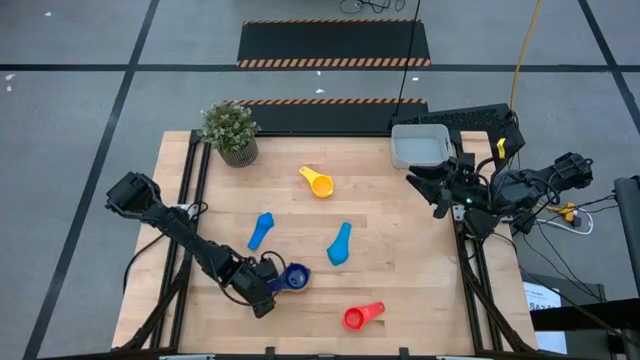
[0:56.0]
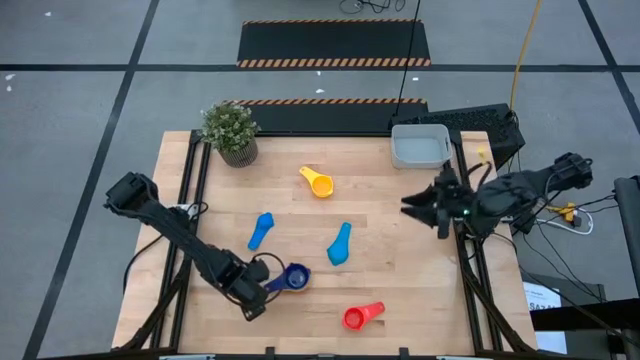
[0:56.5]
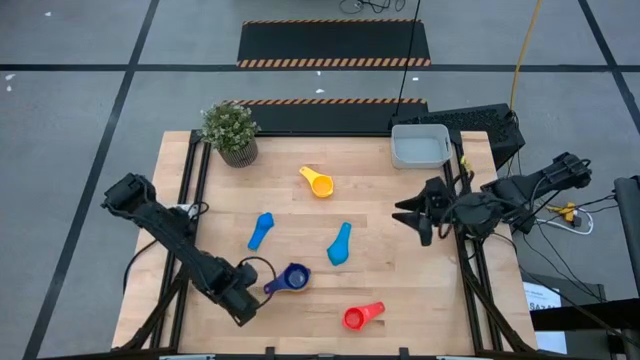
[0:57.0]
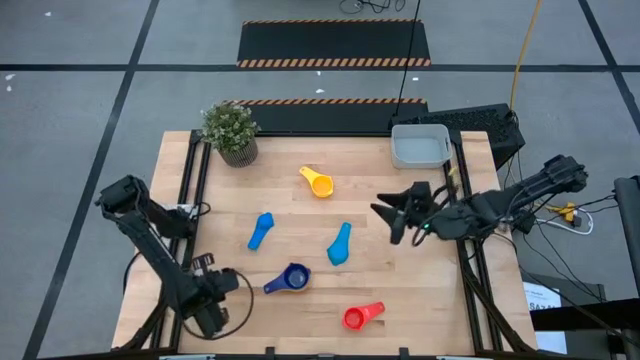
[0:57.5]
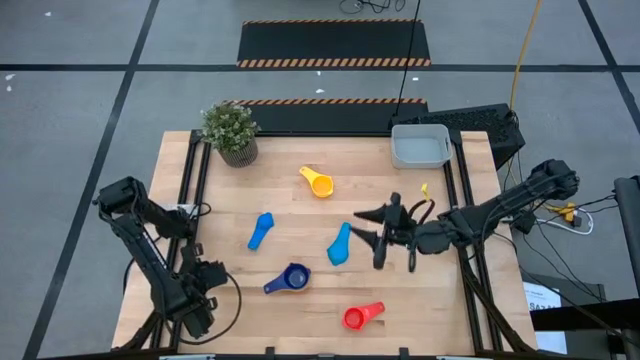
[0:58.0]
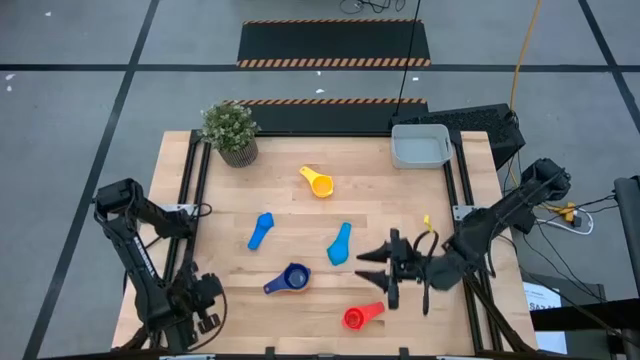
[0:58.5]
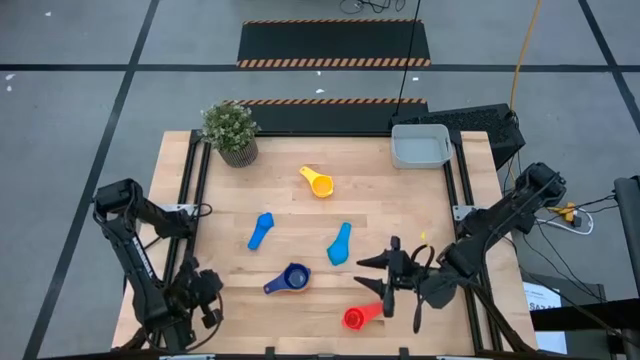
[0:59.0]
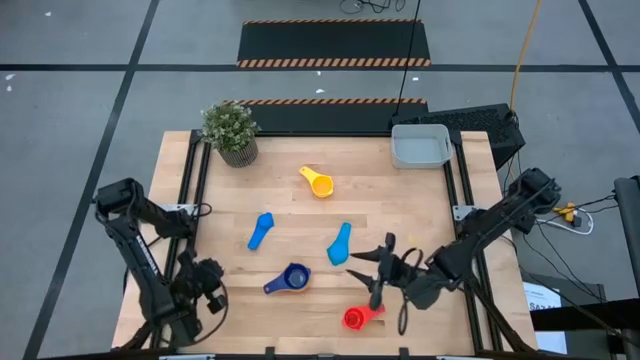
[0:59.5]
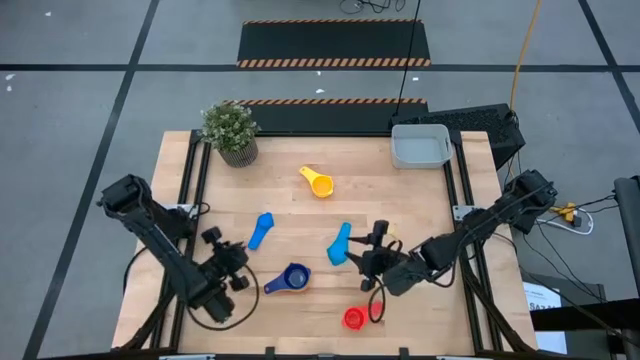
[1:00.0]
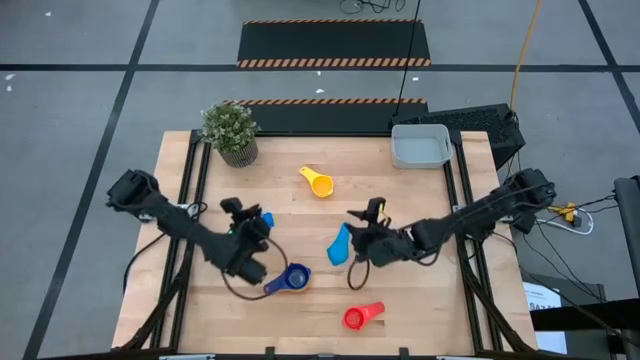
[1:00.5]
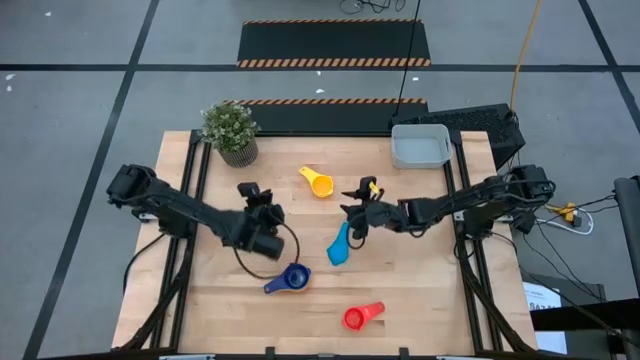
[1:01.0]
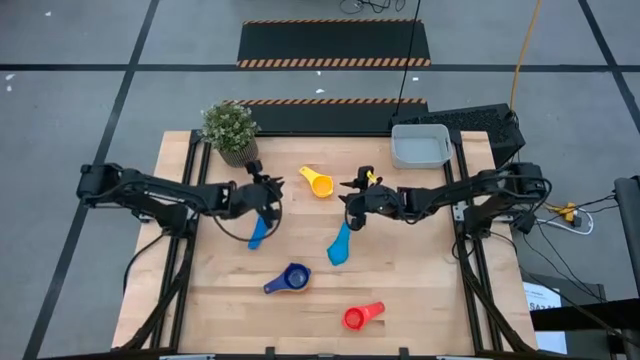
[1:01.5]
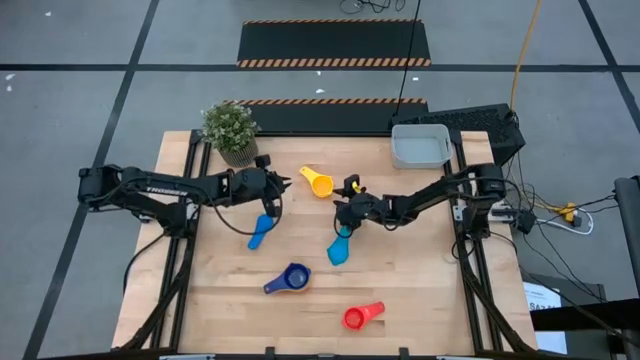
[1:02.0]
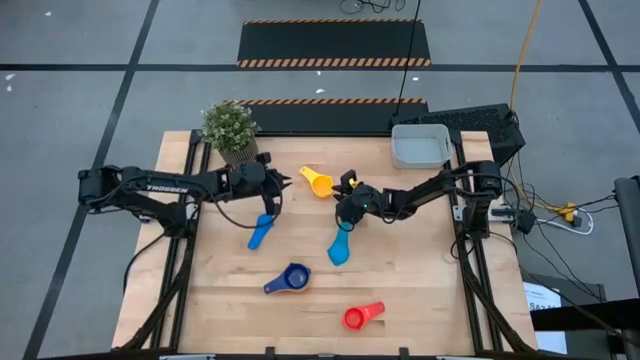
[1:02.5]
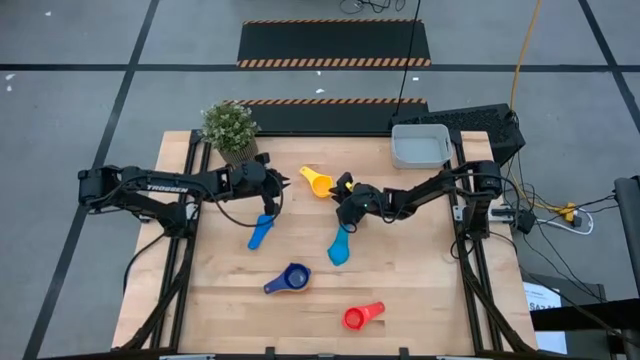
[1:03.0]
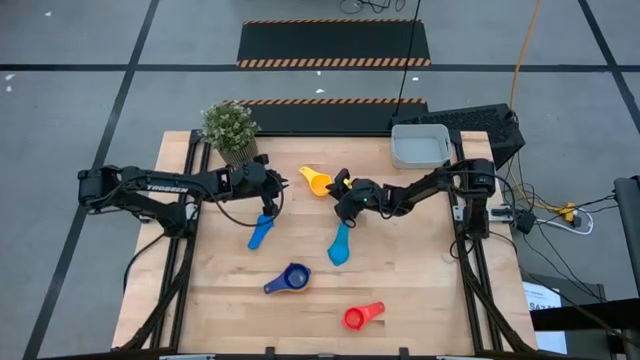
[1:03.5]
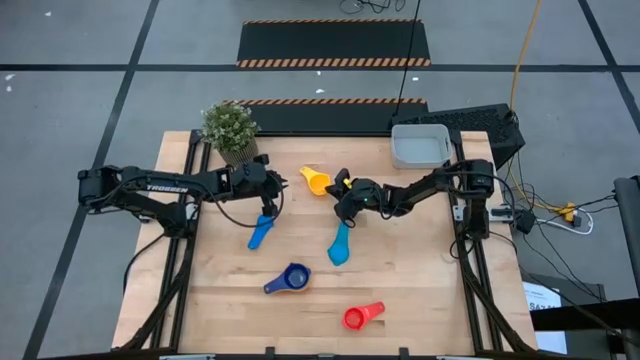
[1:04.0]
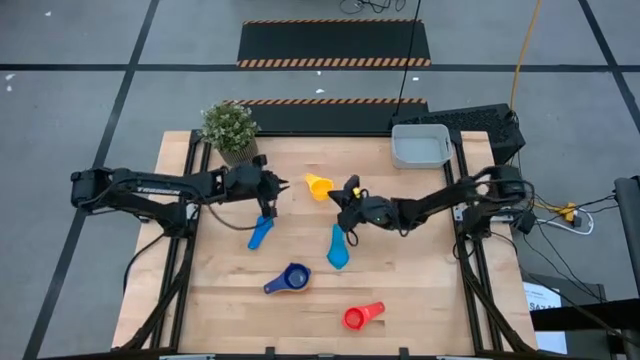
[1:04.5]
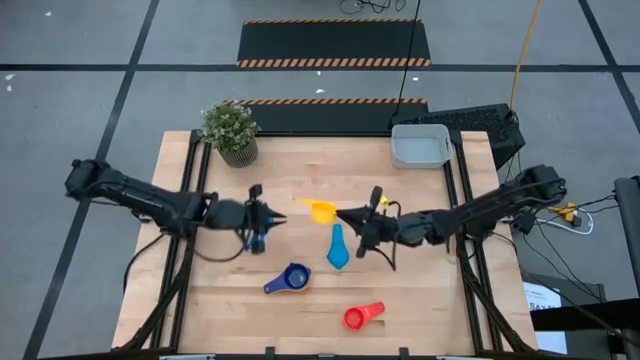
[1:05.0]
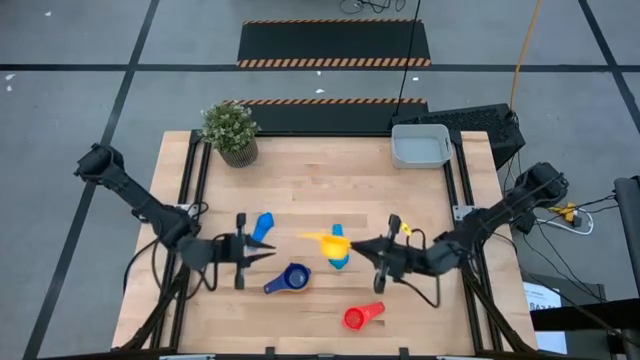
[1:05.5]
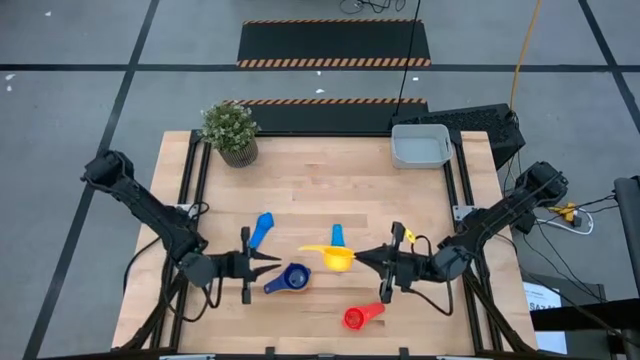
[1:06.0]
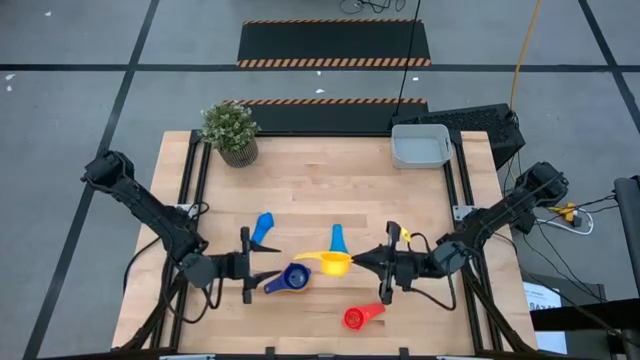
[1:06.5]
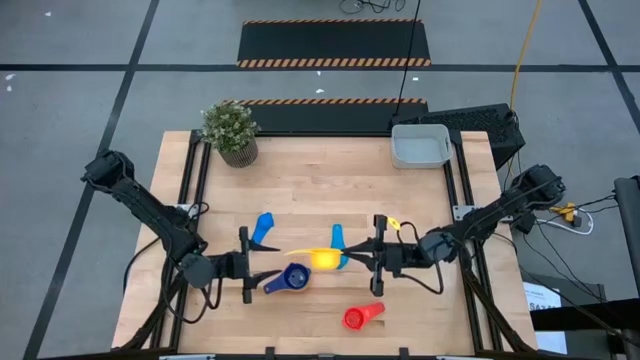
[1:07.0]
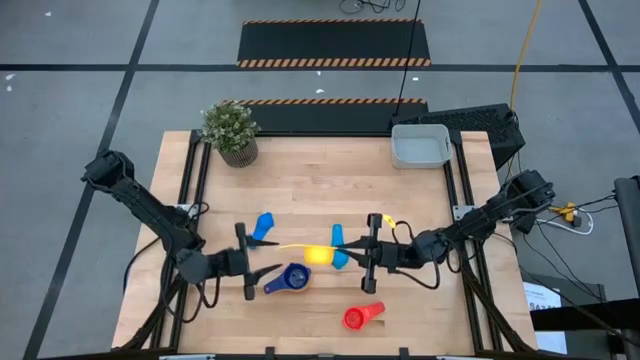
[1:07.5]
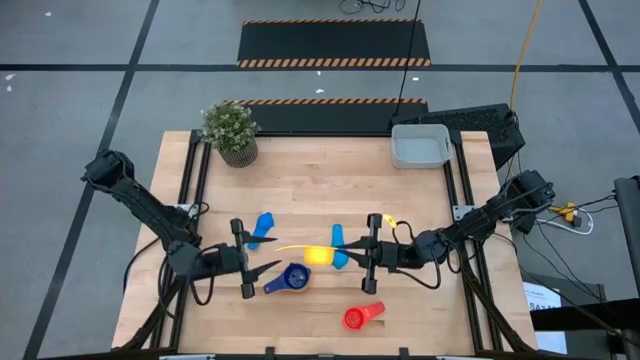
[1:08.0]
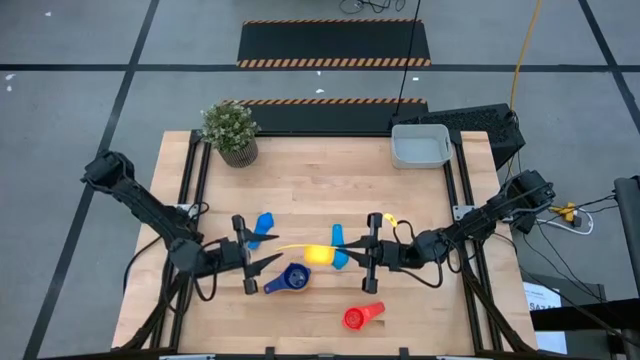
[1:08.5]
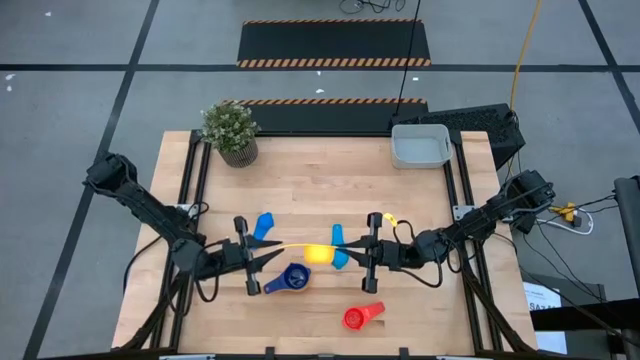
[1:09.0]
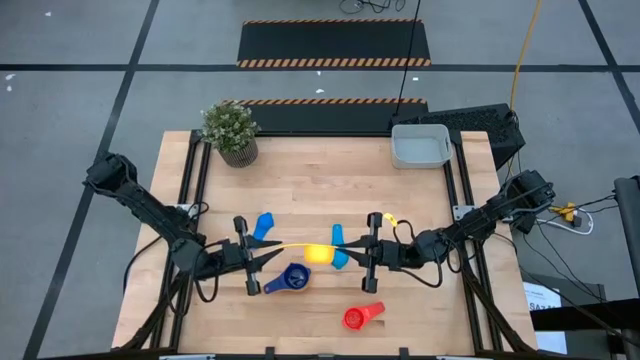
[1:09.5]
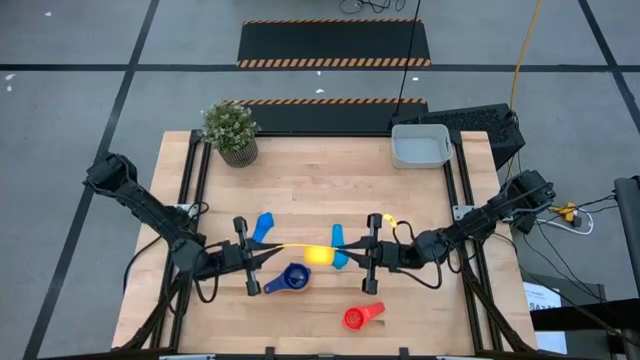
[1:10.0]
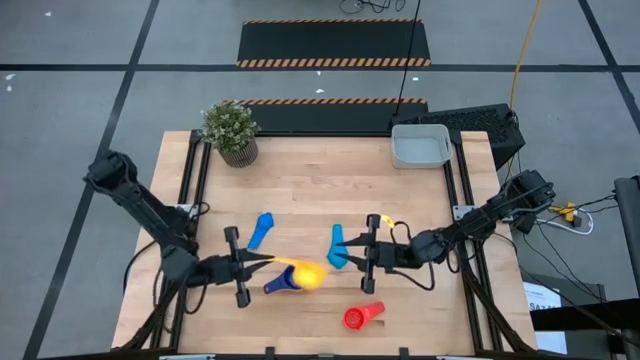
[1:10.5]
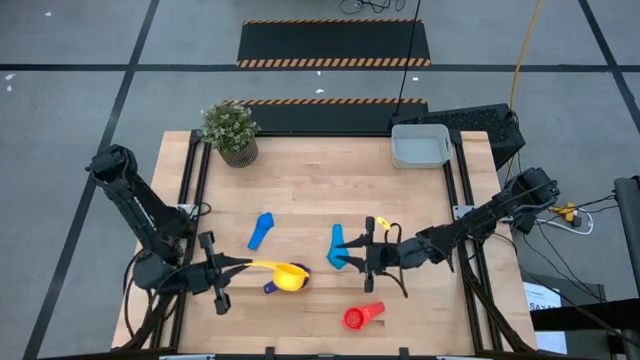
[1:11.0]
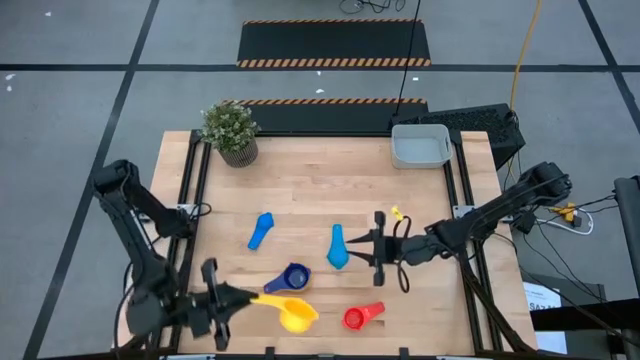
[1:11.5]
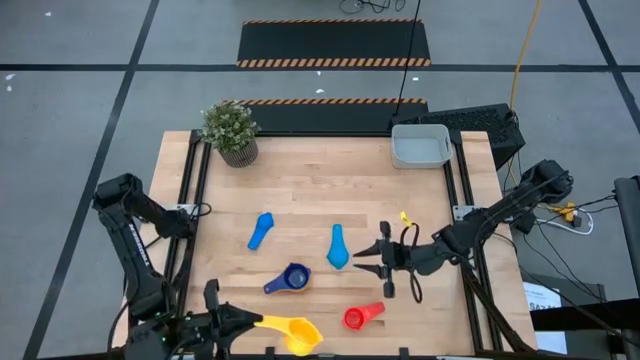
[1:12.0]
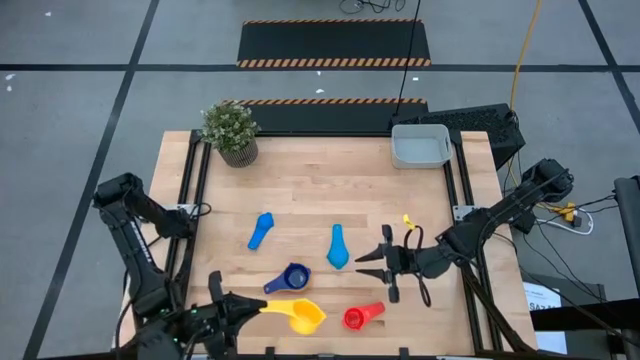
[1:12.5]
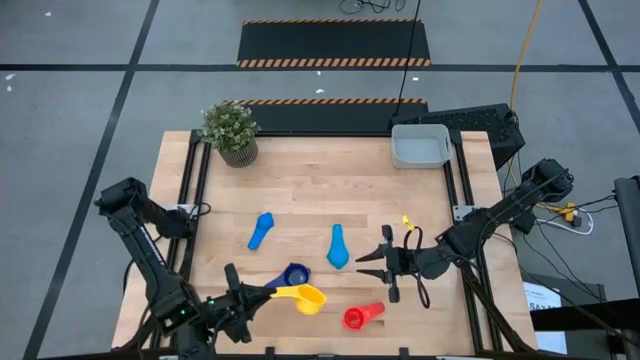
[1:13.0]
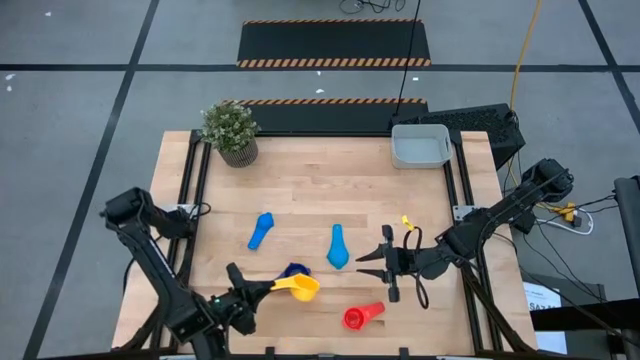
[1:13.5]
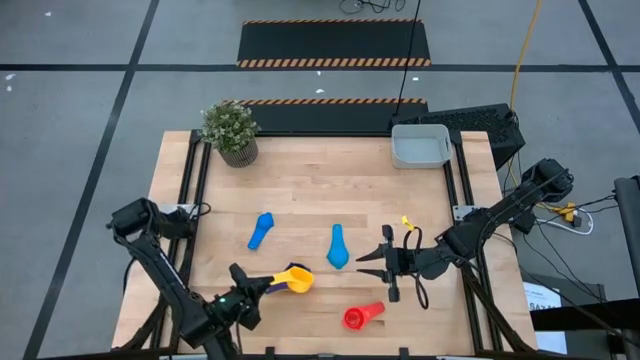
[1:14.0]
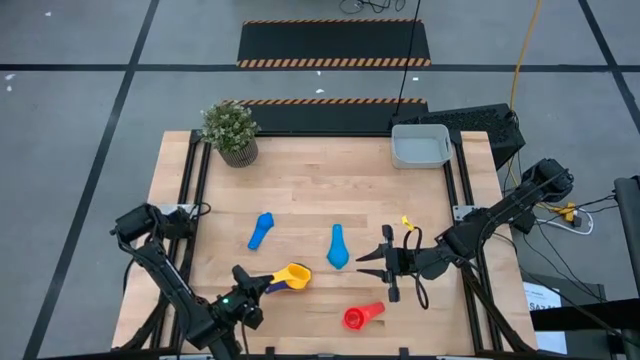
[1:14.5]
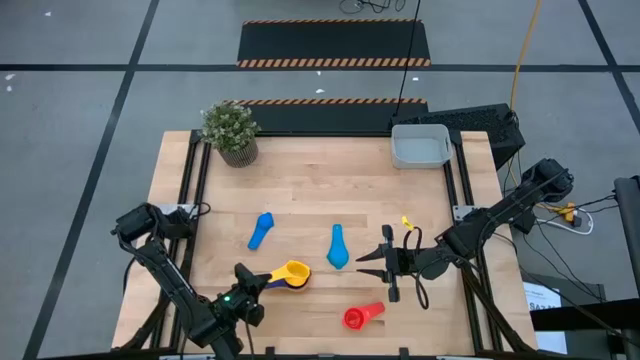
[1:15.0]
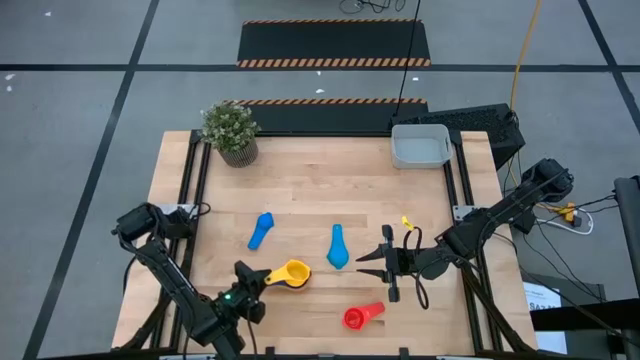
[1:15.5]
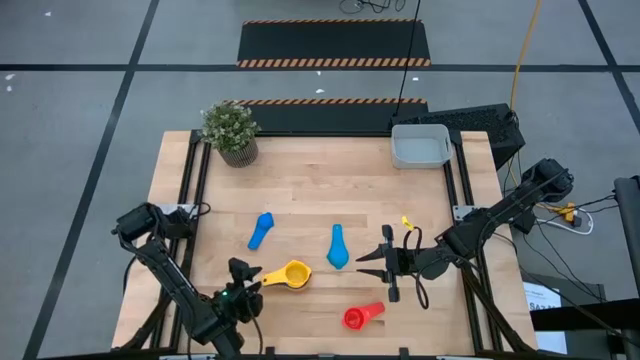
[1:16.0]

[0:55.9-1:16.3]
Task: Nest measuring cups in basket
Stack the yellow measuring cup on the dark blue measuring cup

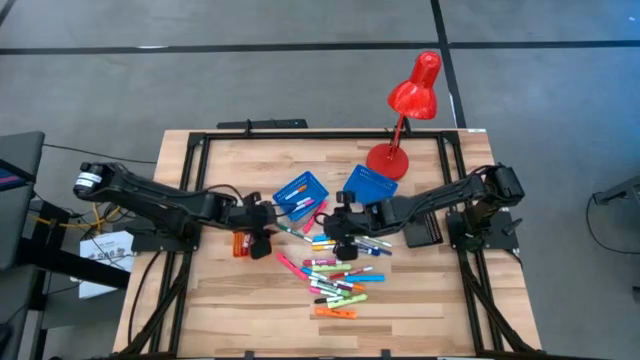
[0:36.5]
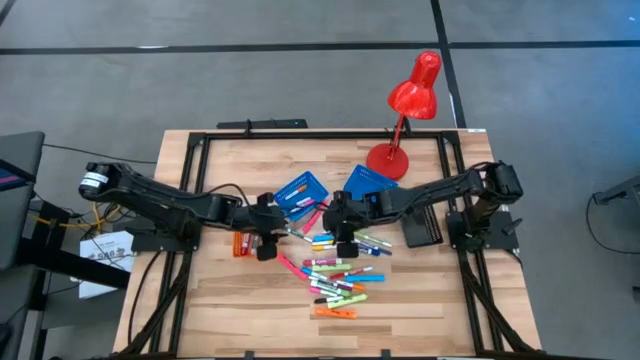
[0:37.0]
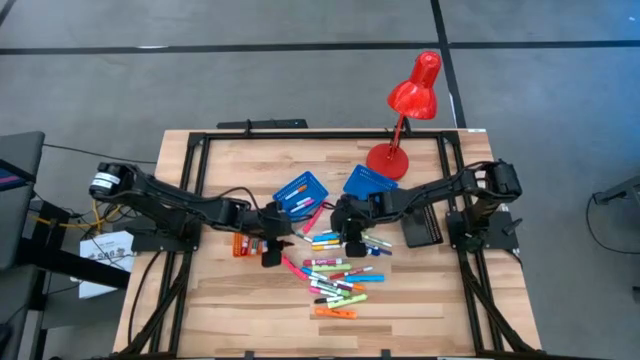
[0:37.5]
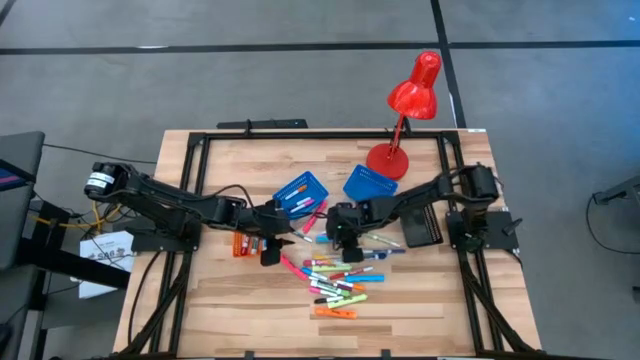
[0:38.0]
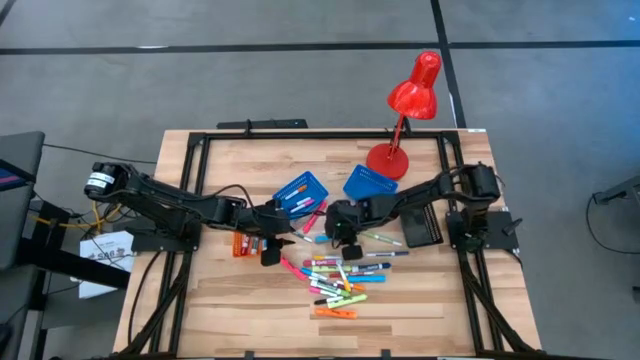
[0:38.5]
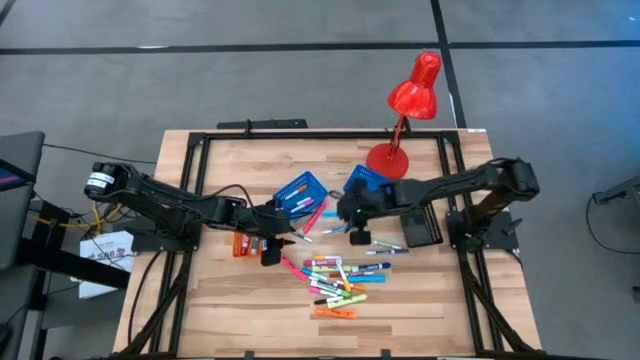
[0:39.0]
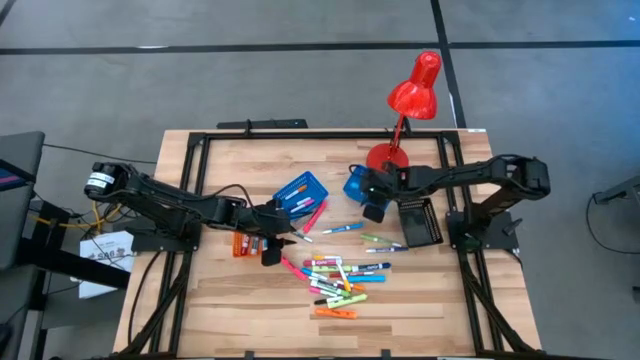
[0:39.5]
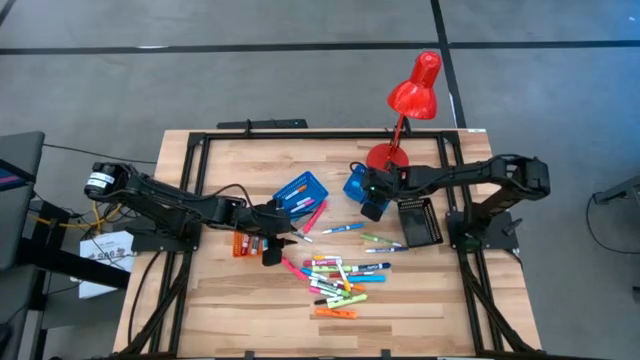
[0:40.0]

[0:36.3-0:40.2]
Task: Pick & Place Markers
Put the large light blue highlighter pen into the right blue bin
